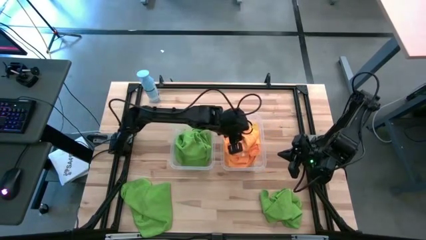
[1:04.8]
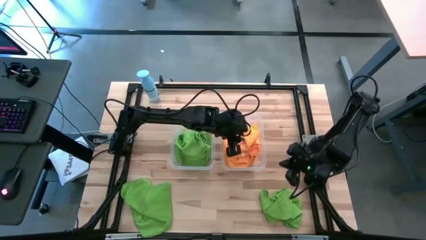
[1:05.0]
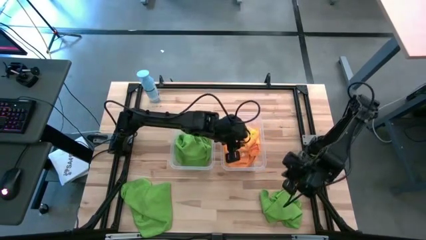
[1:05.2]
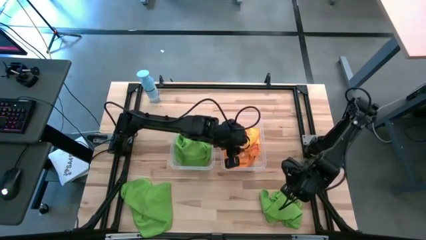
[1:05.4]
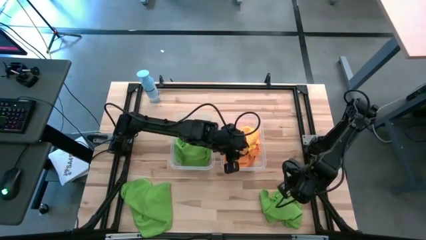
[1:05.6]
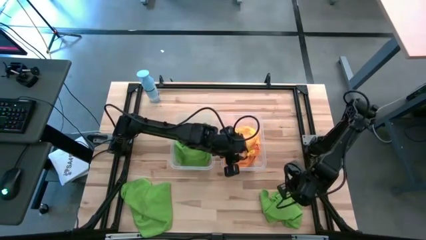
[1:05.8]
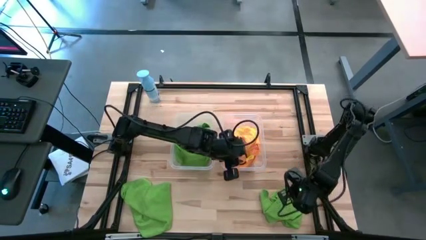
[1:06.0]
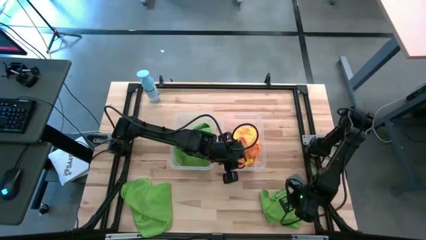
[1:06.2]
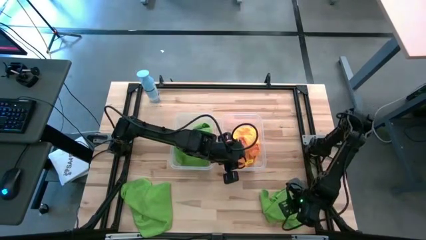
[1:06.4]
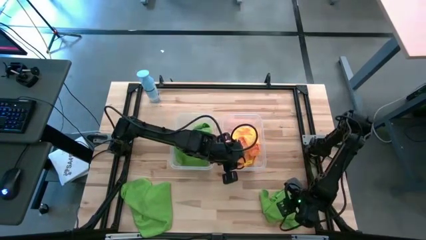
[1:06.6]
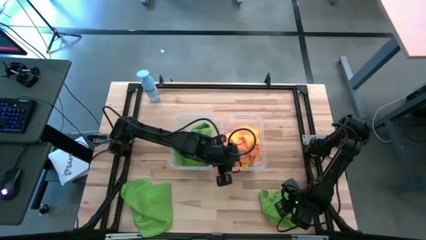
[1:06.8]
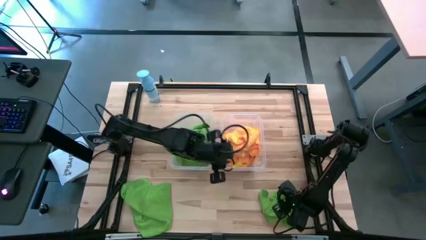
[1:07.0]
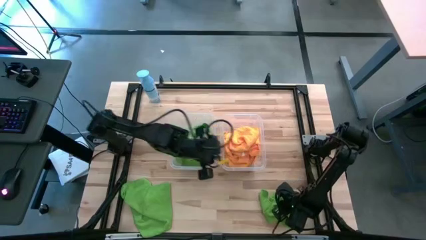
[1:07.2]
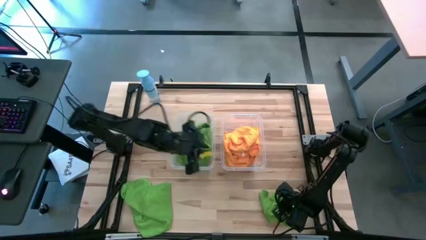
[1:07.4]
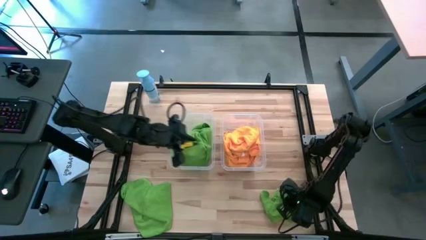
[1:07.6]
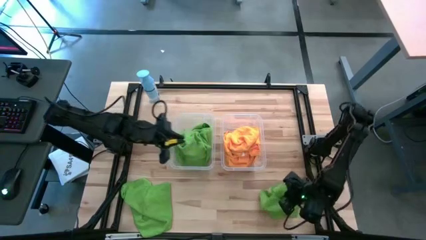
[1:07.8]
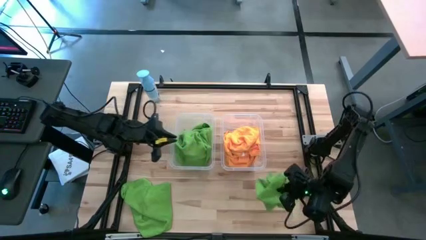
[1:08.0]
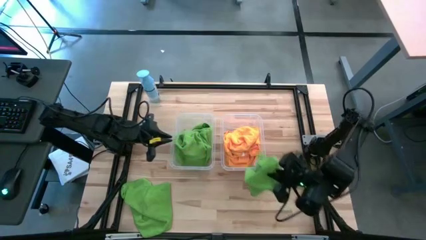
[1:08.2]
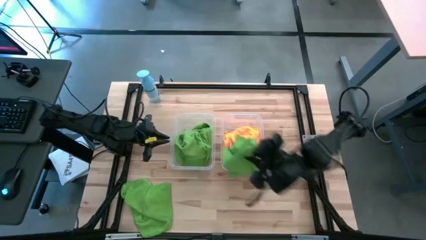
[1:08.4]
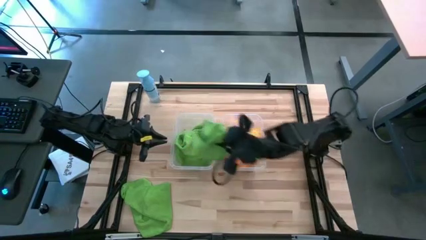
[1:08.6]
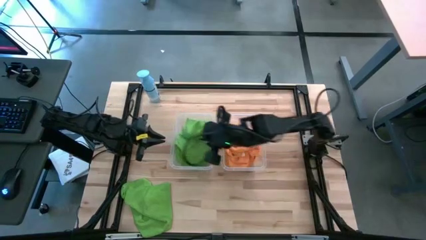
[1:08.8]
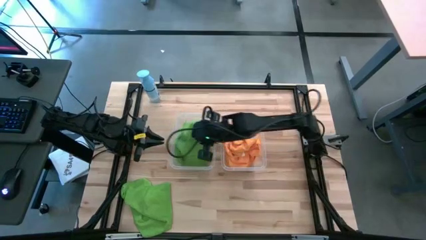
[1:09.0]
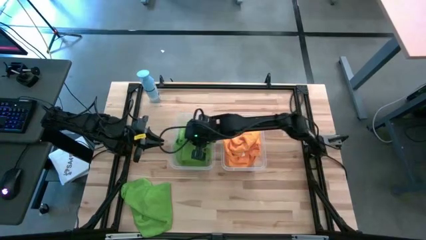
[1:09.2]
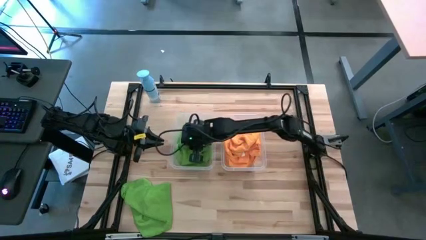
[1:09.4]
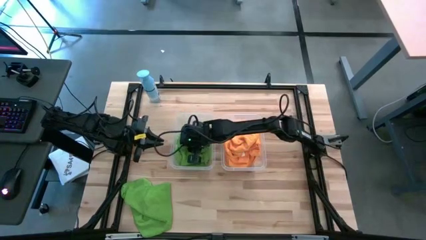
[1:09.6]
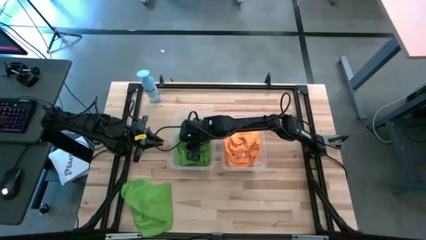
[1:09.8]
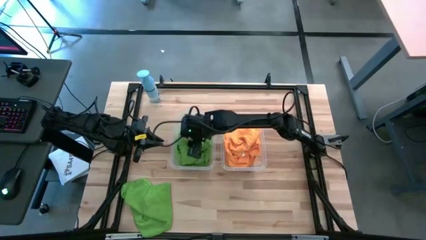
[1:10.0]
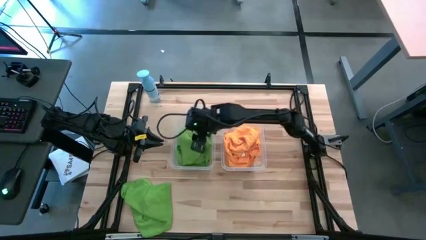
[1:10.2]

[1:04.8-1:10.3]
Task: Sort microfiber towel by color & place in baskets
Put the green towel into the left transparent bin

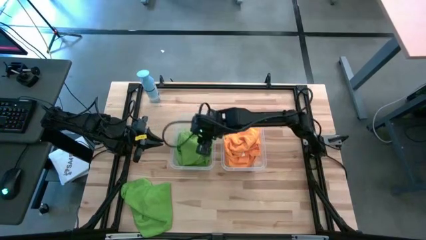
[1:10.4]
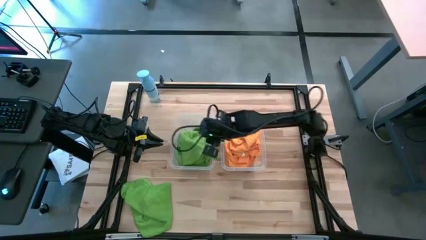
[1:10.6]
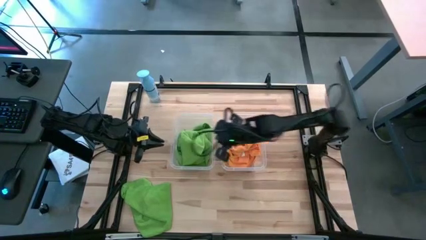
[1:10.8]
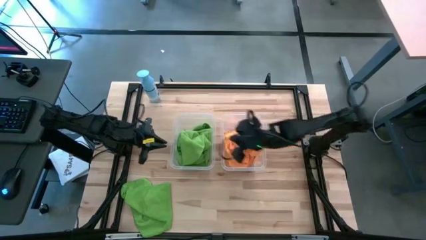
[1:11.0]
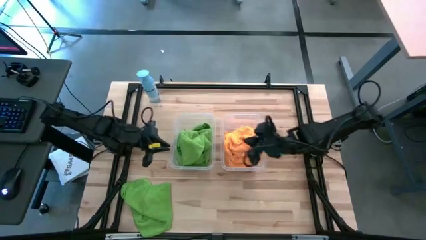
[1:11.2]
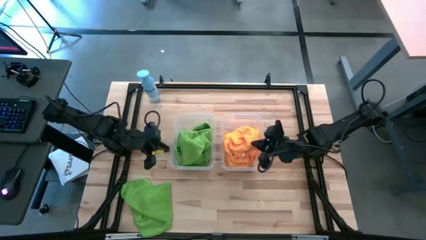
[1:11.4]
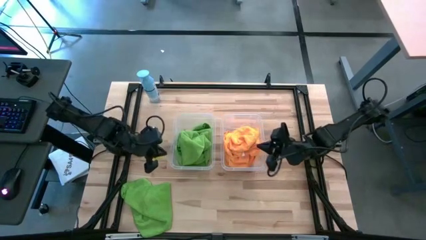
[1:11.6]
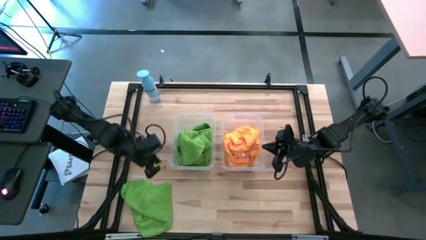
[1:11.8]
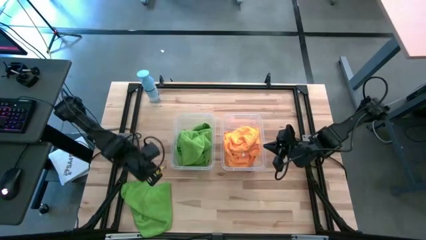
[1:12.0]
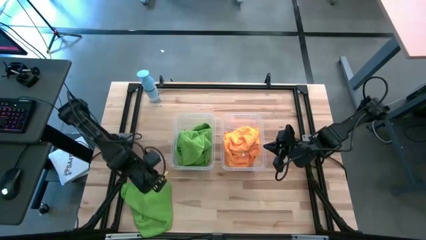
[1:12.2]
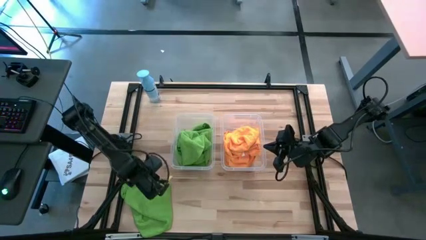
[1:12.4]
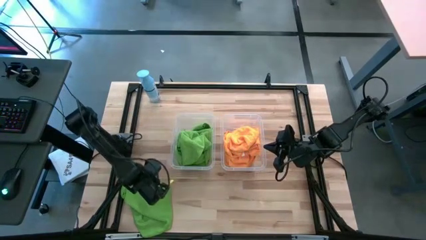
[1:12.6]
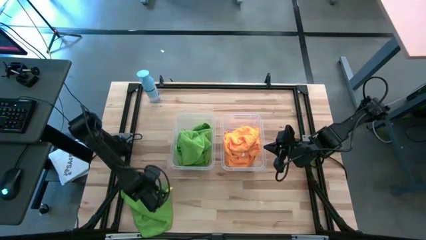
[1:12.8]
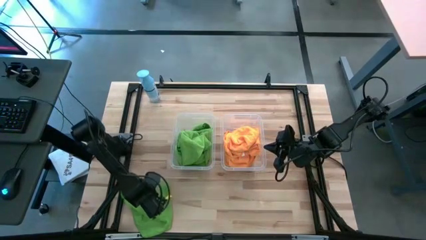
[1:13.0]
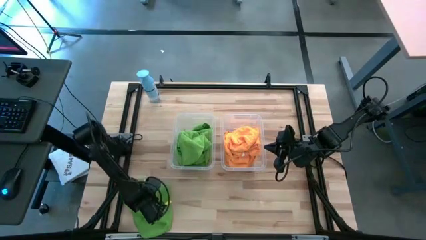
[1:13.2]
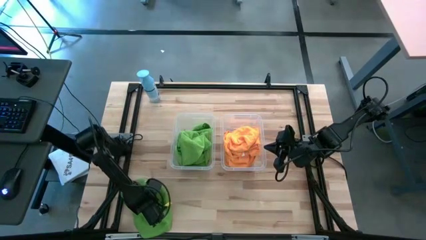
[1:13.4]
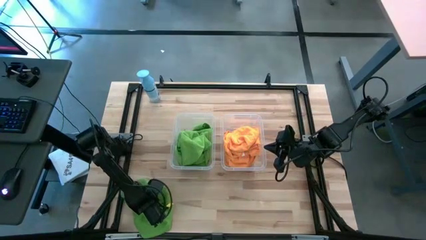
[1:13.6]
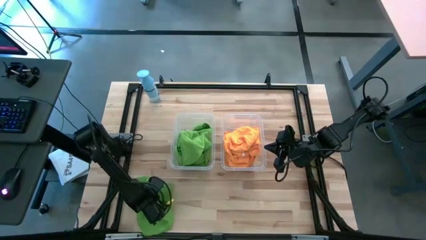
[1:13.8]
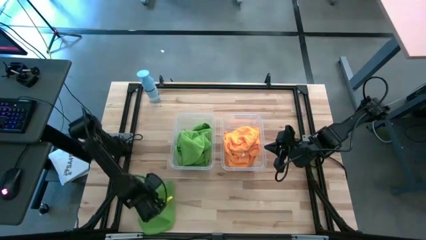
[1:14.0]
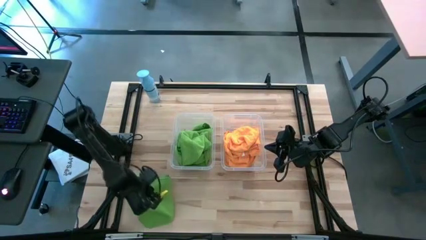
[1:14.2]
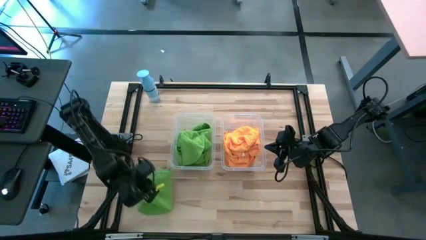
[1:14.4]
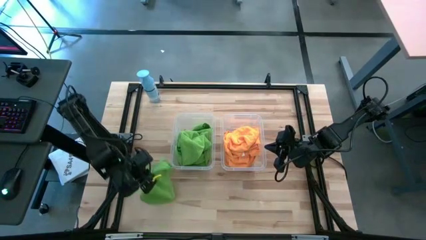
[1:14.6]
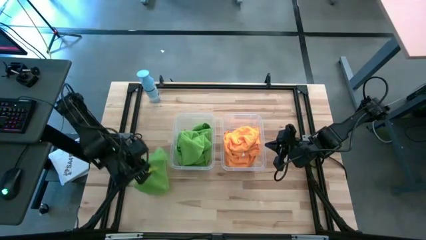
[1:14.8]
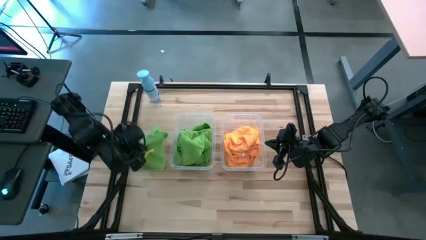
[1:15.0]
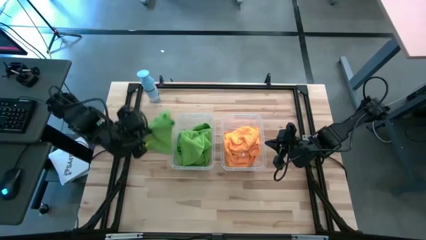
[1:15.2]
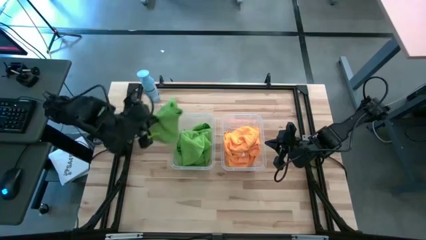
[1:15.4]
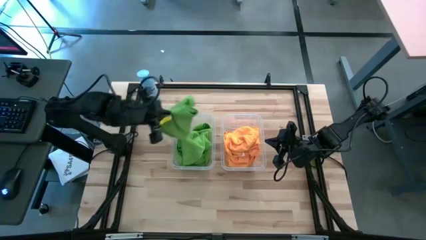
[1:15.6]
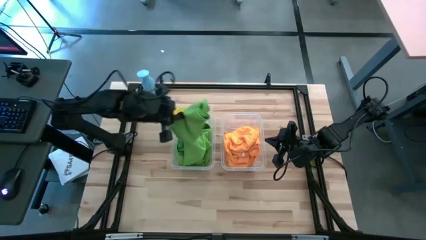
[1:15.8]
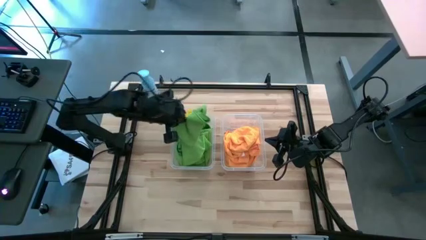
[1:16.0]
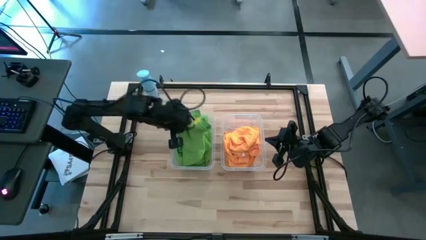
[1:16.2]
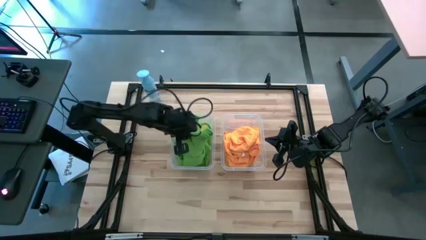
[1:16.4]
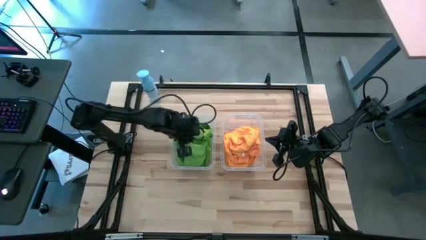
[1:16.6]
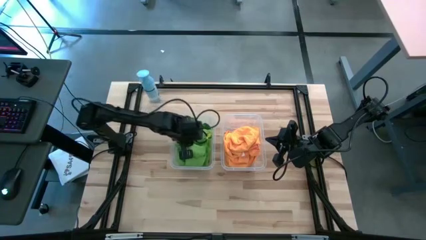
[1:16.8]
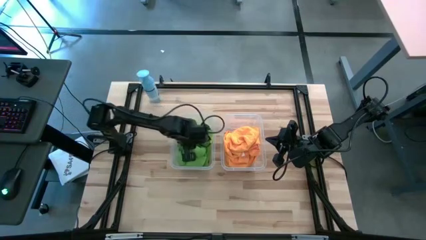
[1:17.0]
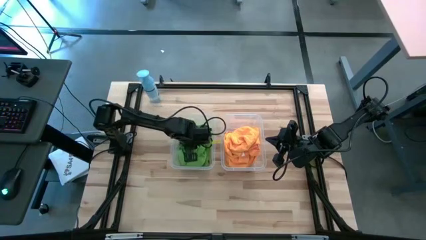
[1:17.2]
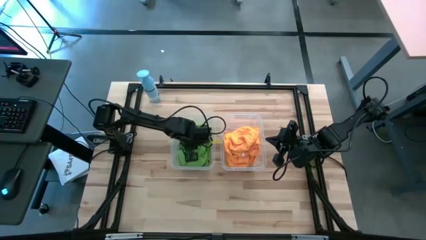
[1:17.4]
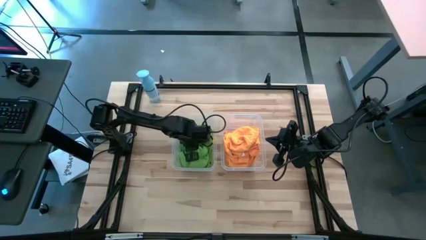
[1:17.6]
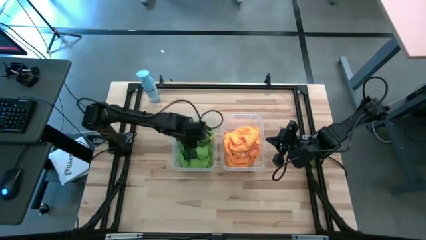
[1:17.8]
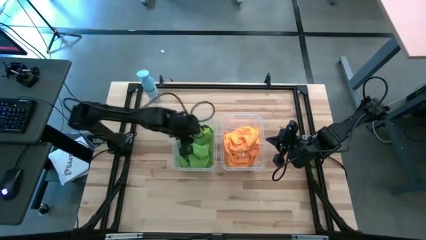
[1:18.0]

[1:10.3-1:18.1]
Put the green towel into the left transparent bin

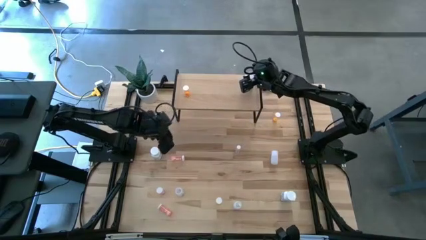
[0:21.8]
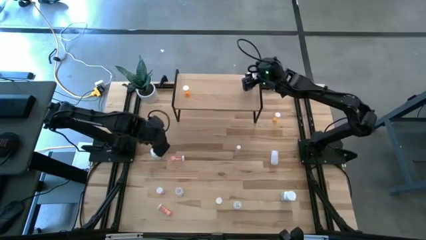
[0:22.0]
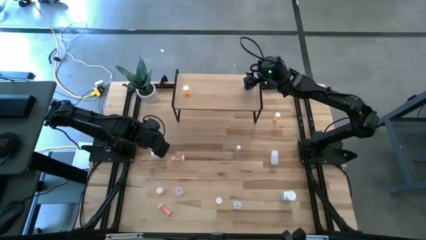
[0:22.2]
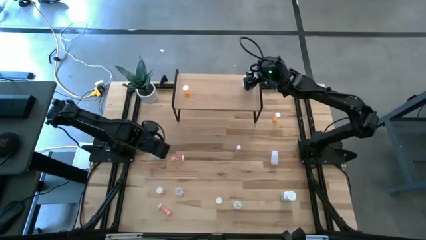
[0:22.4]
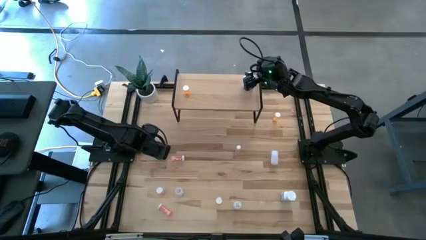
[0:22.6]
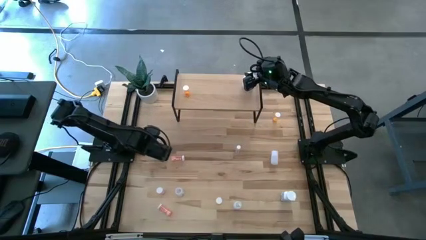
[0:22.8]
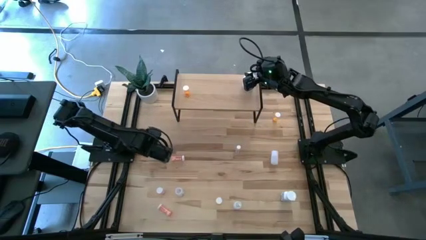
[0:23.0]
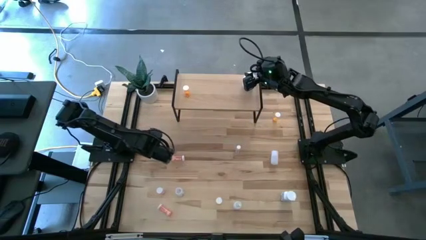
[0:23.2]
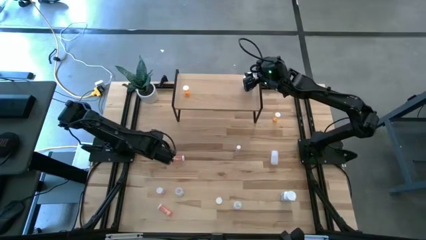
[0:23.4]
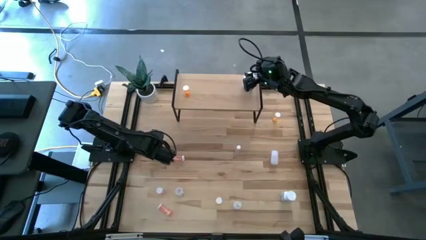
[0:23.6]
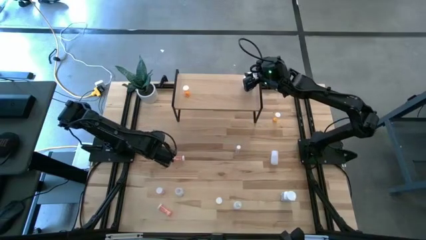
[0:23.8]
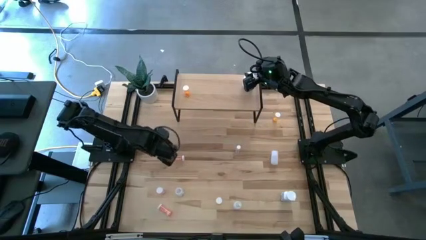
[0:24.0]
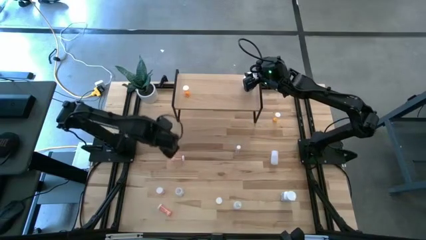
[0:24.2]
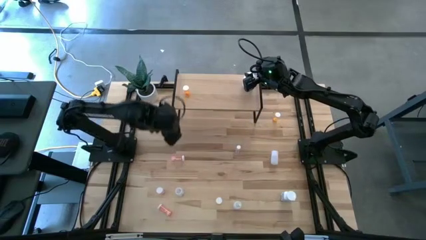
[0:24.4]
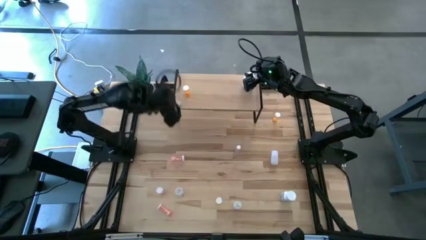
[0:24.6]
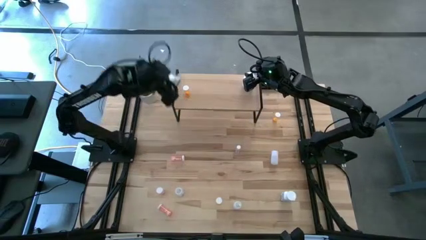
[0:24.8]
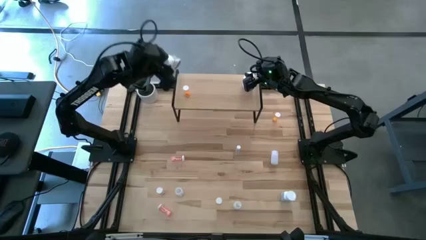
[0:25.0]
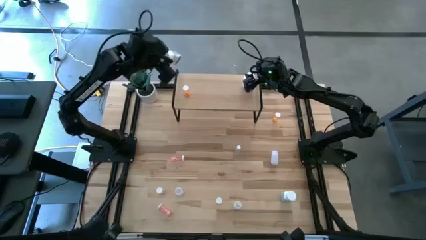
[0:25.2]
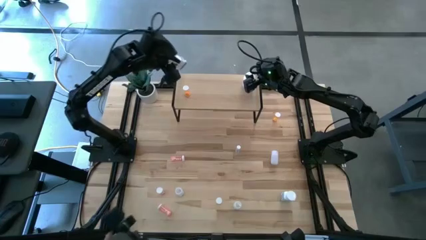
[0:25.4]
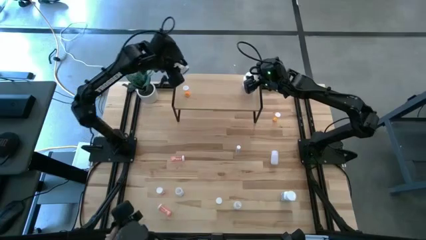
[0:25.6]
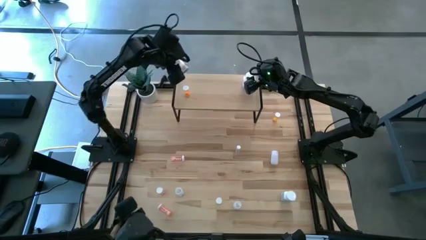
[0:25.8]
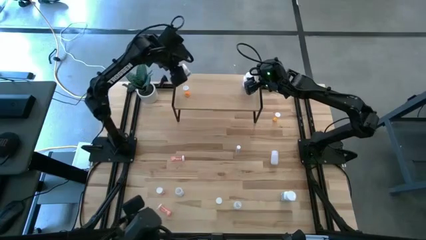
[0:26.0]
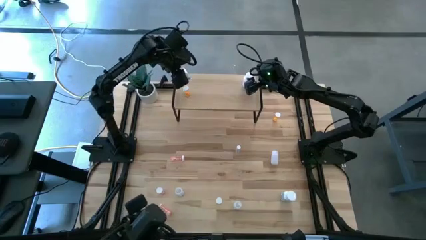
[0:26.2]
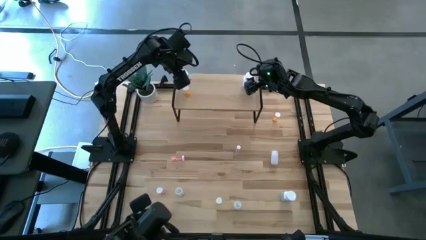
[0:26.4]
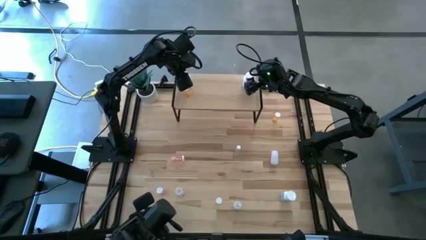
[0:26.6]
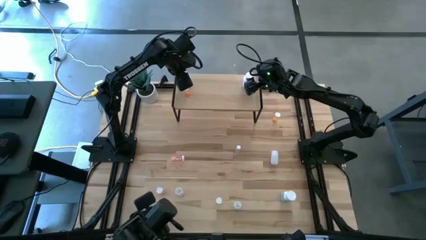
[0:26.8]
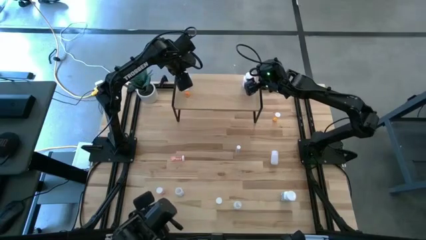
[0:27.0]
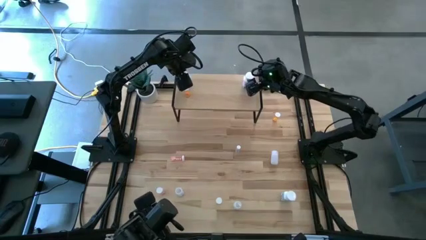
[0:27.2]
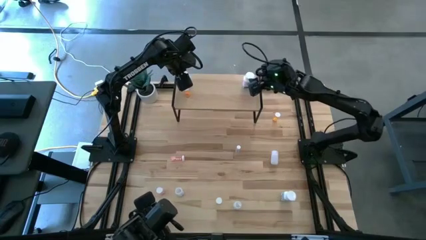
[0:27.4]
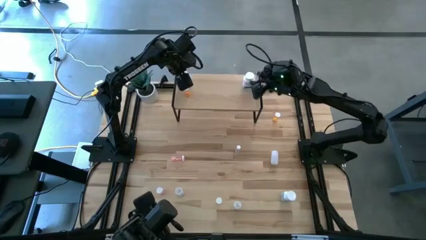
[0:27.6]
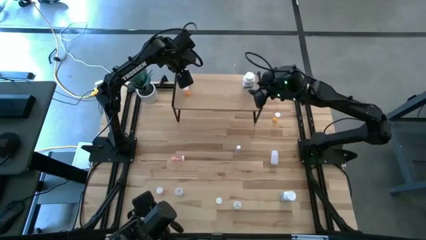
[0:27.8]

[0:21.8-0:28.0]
Task: Pick and place medicine bottles onto shelf by color
Put the top left blue pill bottle on the shelf
